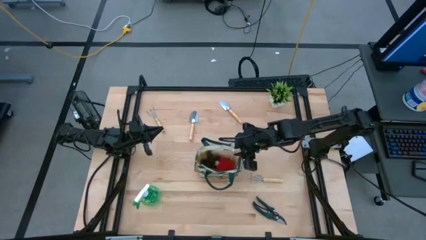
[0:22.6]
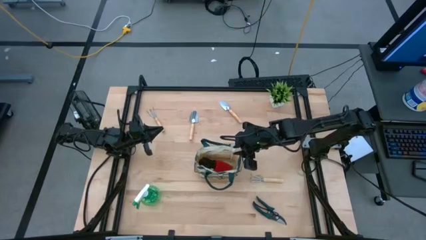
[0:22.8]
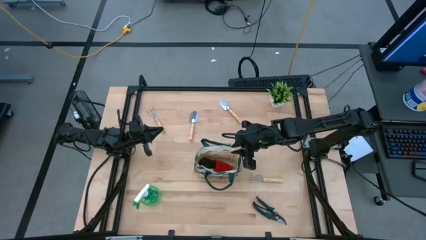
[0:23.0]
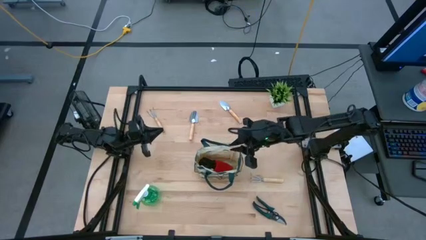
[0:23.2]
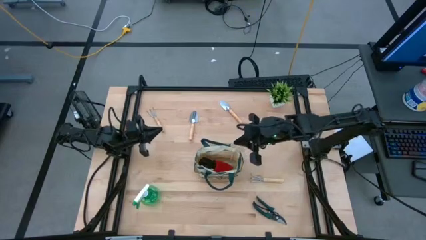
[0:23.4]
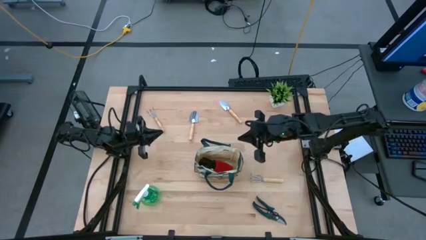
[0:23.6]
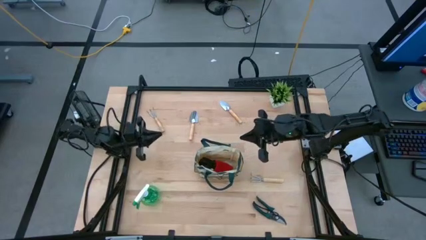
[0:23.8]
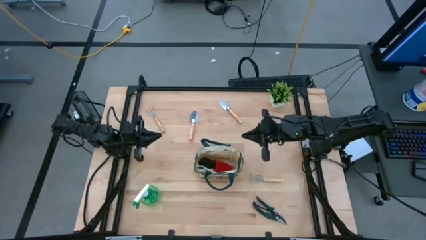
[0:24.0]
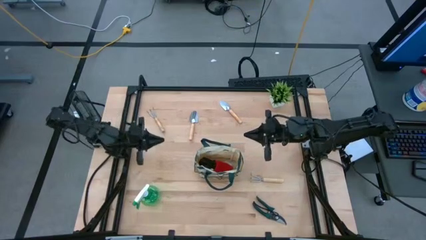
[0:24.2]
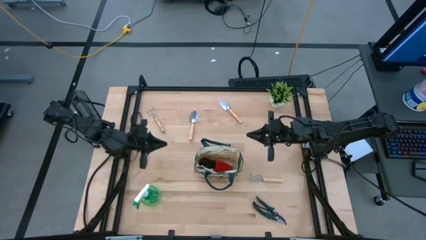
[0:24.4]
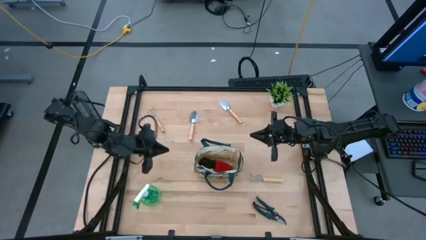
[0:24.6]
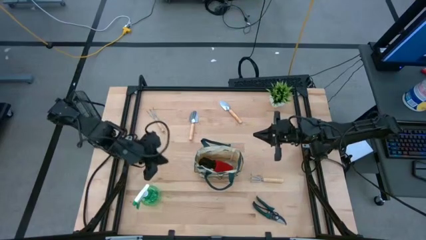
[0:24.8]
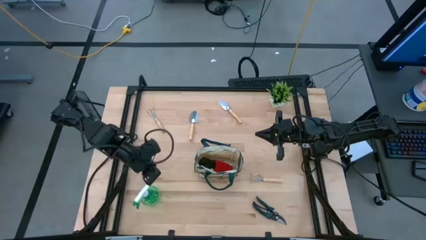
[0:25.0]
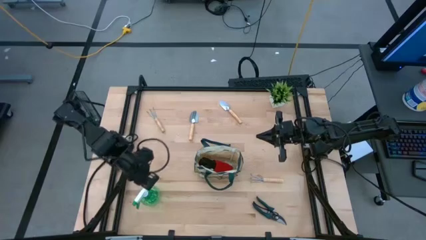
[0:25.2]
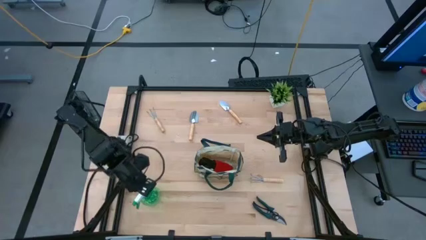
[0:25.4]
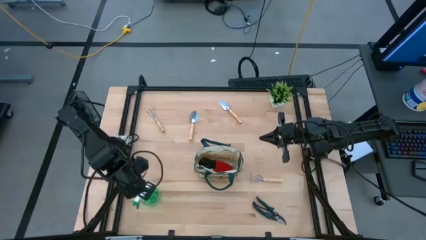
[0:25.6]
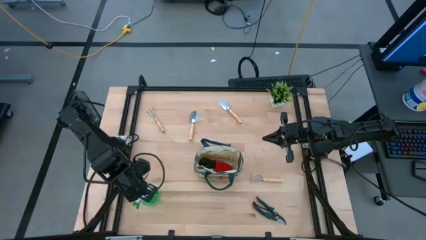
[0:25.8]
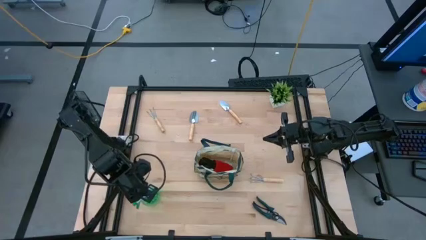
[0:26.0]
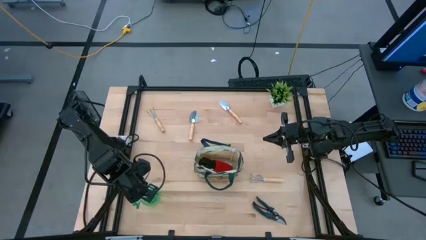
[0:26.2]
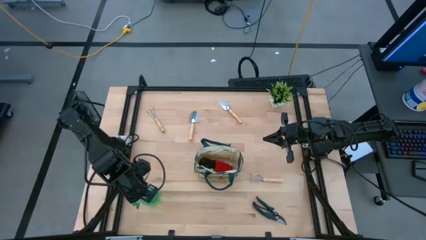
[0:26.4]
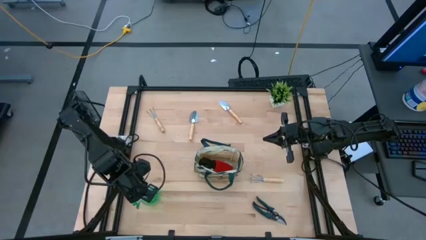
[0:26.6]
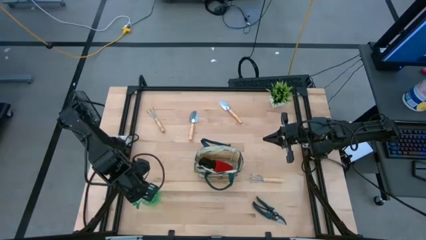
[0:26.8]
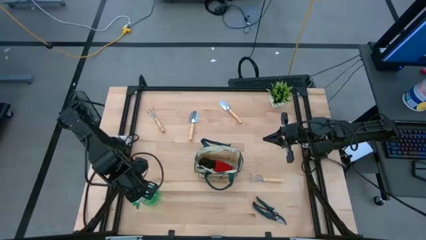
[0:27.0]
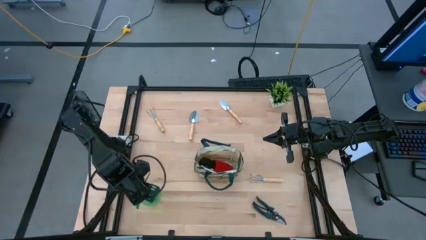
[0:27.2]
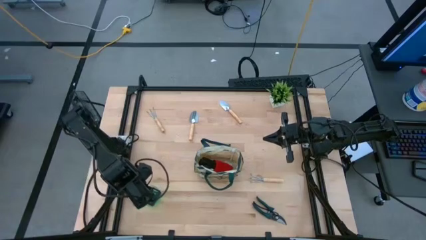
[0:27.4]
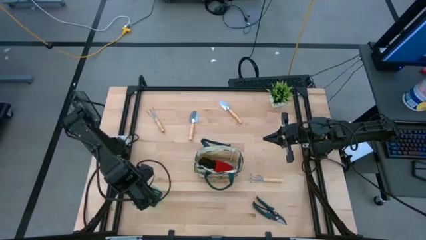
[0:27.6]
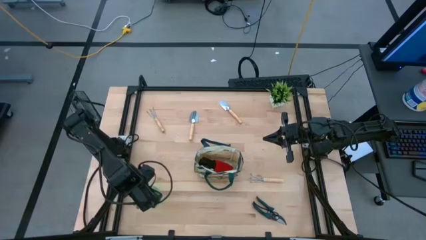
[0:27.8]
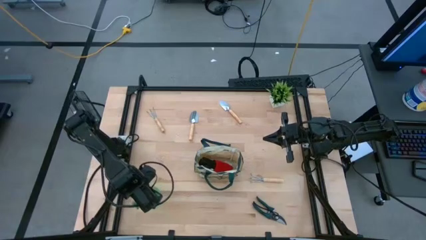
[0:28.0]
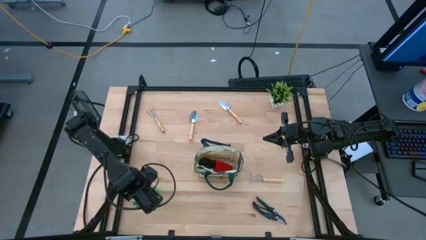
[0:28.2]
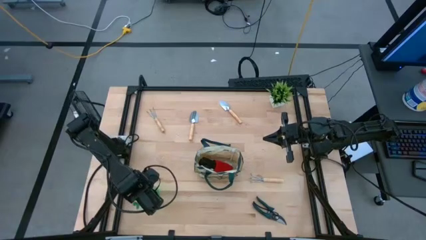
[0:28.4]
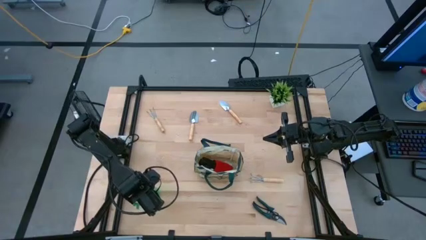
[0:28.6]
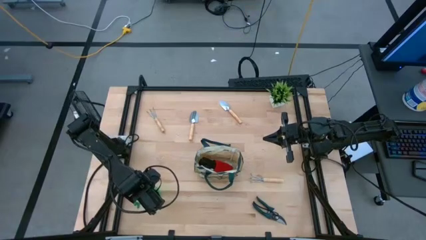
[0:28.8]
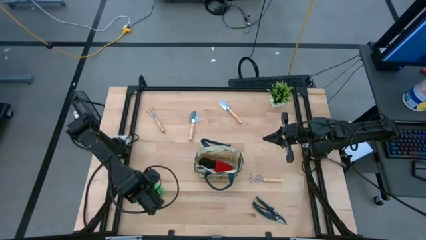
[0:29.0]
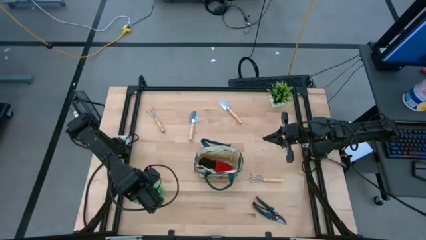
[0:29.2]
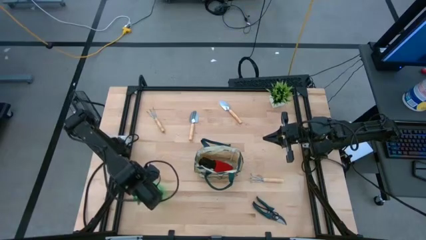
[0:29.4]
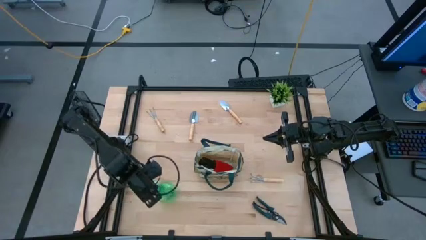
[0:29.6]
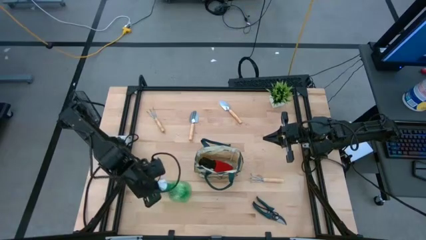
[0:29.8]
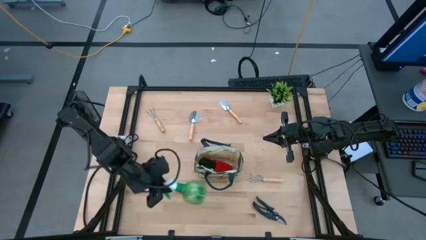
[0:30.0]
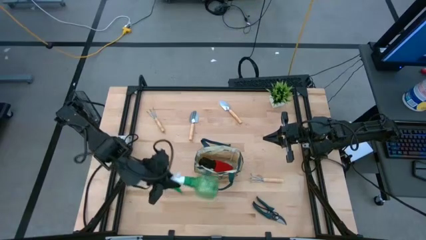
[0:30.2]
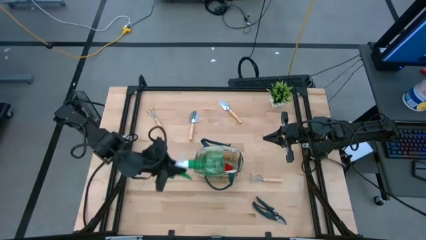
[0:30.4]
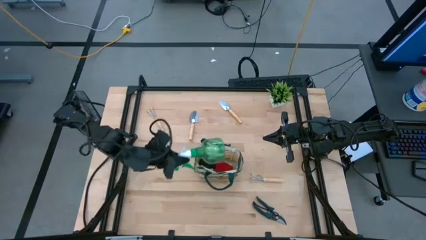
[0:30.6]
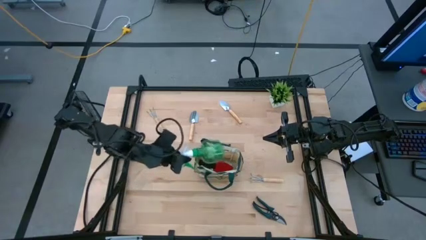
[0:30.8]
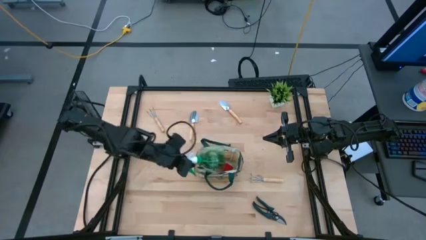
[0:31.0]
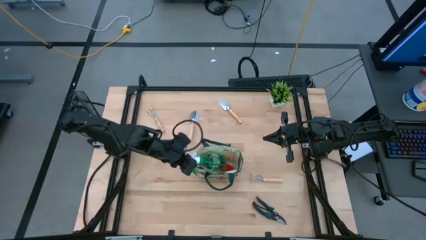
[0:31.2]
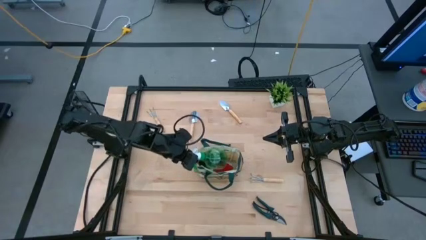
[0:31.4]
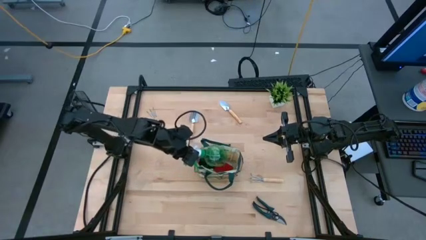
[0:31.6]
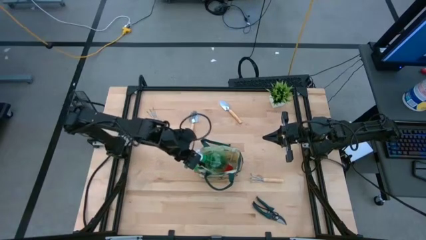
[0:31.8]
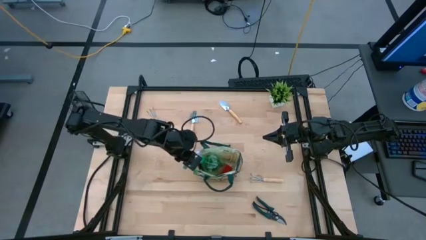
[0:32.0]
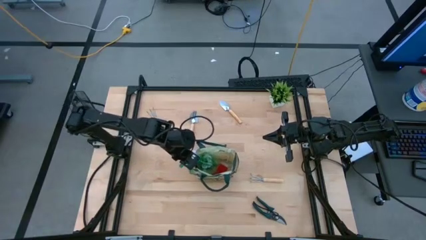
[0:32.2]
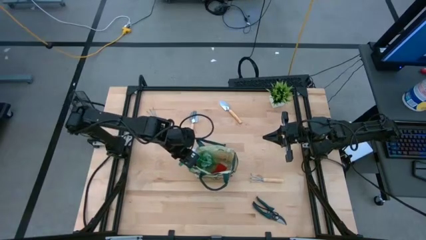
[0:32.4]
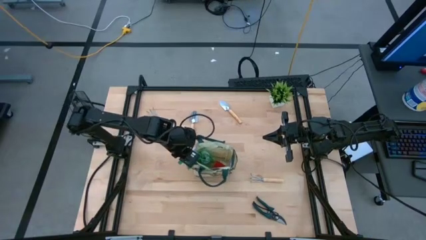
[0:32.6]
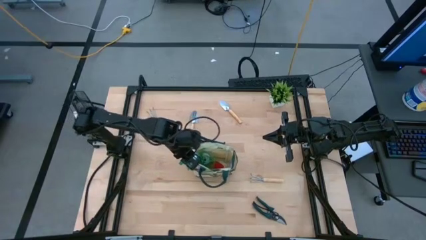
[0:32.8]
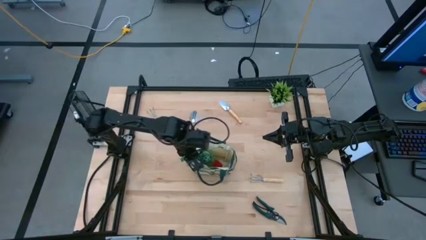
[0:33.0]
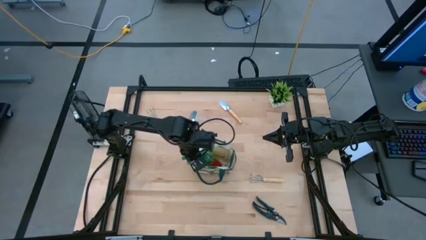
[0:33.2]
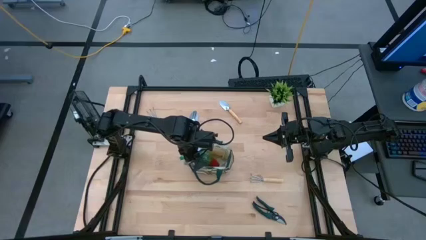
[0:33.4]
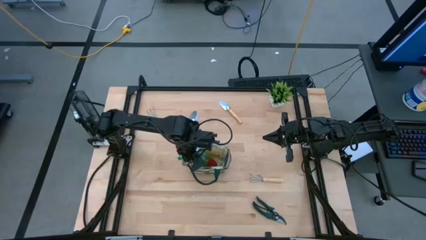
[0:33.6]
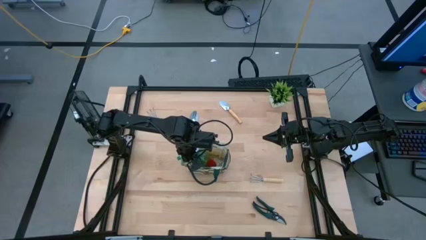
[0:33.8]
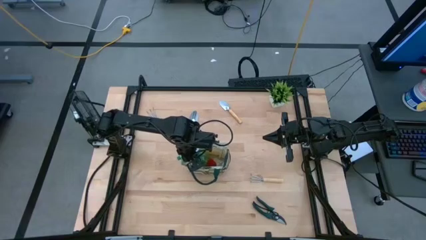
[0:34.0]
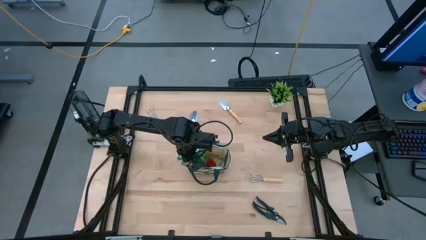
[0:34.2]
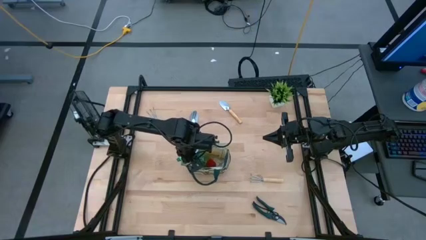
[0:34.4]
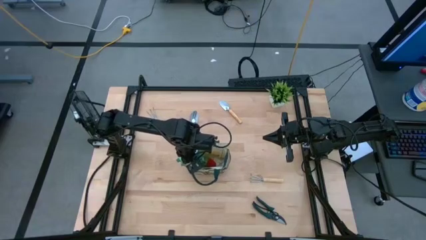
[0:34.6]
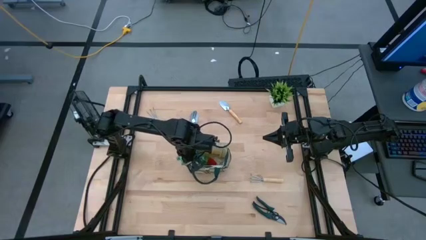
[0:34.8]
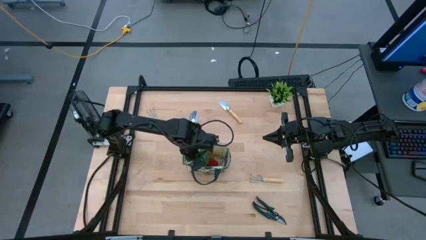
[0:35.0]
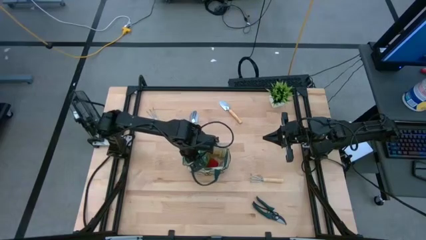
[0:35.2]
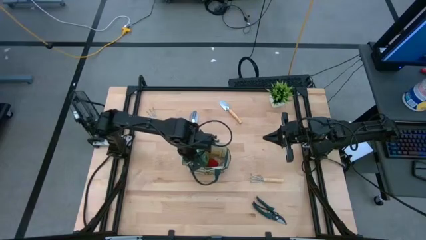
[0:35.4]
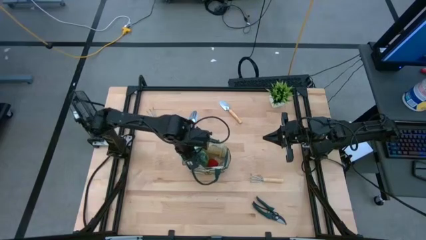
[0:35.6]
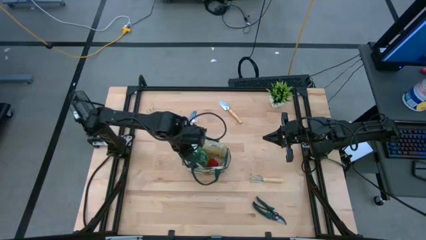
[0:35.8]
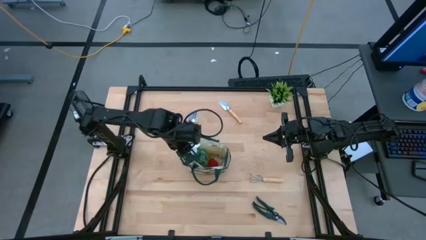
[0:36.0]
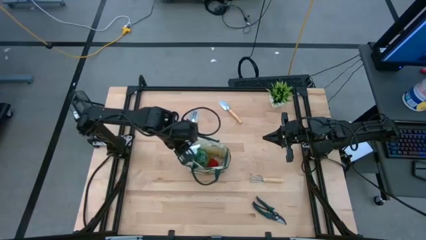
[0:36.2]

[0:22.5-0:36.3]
Task: Pick & Place Garden tools in Gardening bag
Put the green spray bottle into the white gardening bag

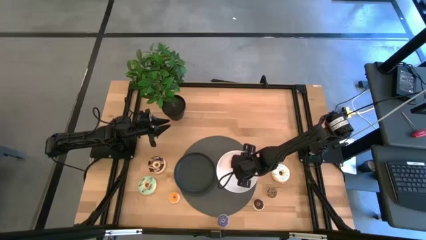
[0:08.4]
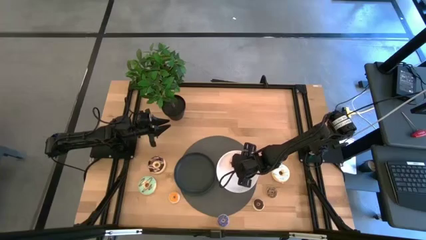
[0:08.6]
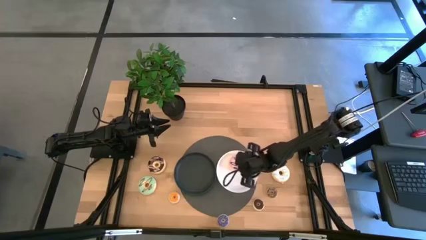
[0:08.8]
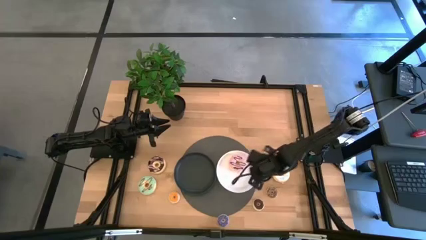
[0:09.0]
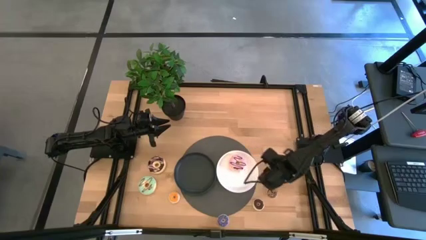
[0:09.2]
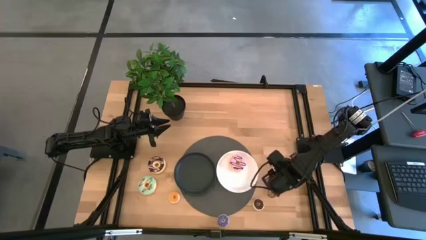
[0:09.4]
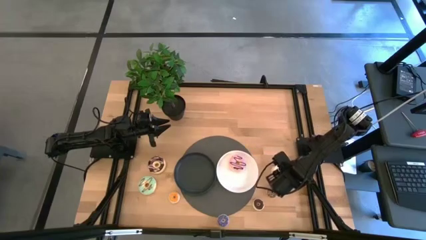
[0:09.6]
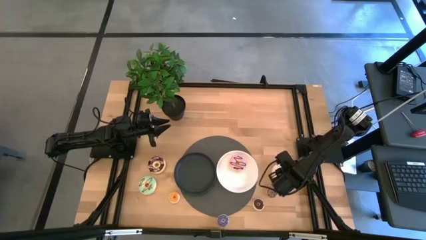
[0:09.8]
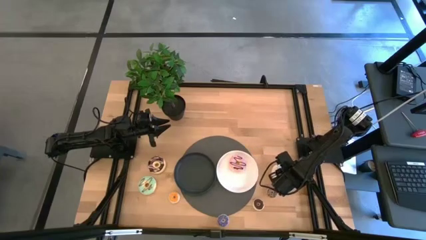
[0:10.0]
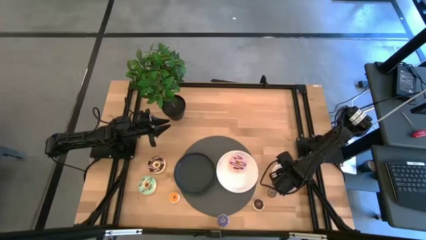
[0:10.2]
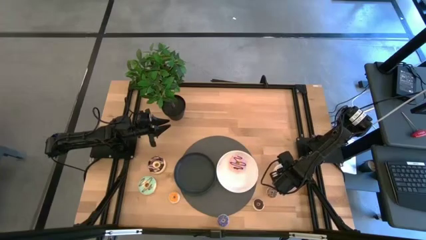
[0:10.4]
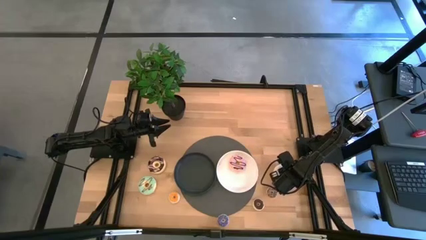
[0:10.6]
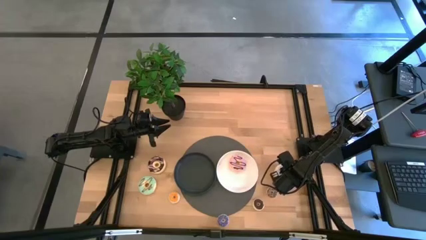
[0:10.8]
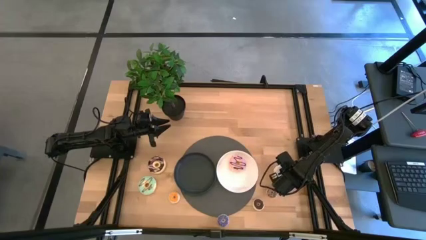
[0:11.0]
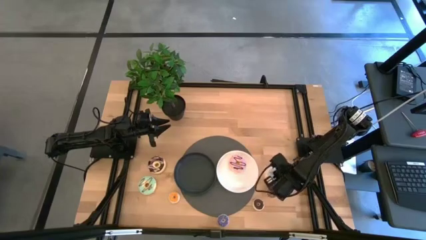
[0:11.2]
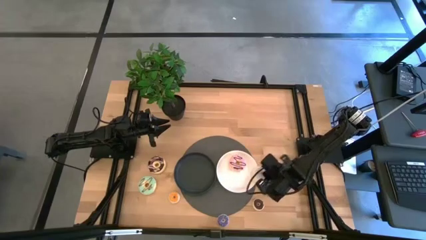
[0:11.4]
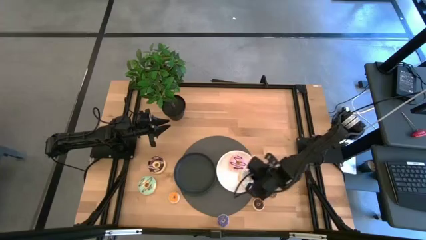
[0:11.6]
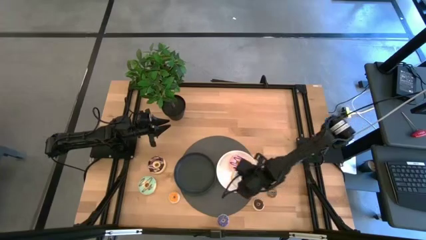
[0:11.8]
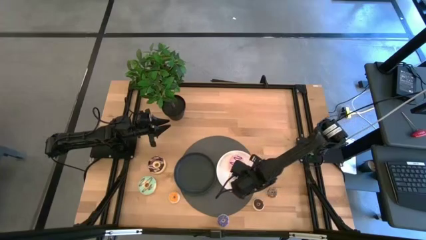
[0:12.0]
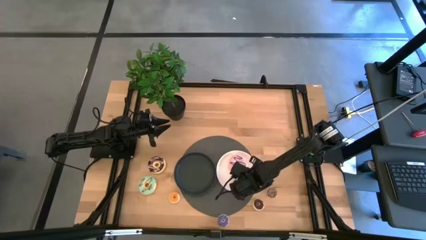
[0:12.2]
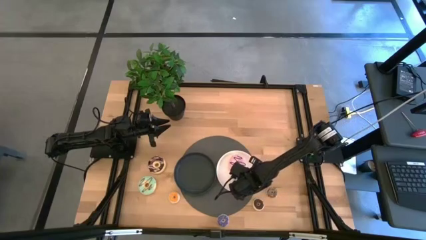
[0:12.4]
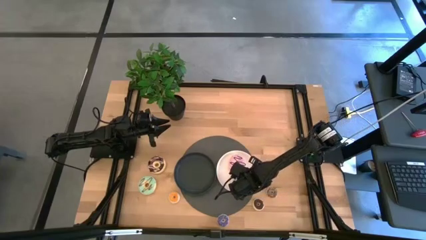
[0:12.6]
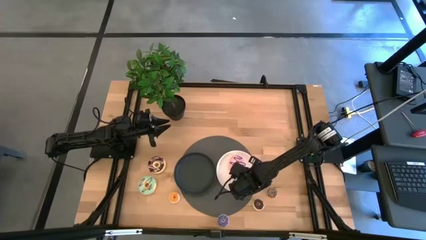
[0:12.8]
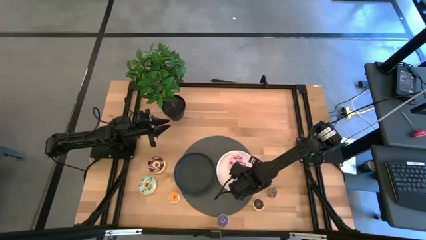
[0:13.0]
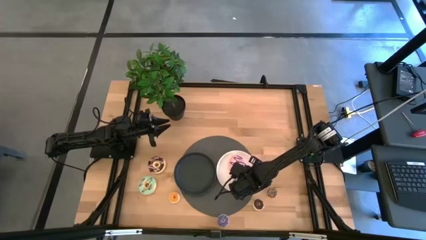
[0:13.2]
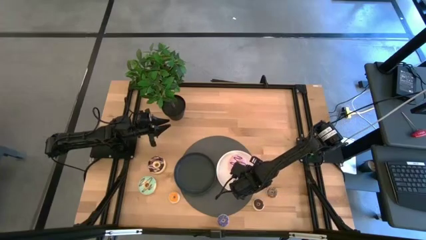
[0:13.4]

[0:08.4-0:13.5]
Task: Pick & Place donuts
Put the large white donut onto the white plate
